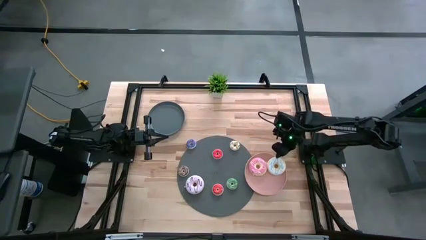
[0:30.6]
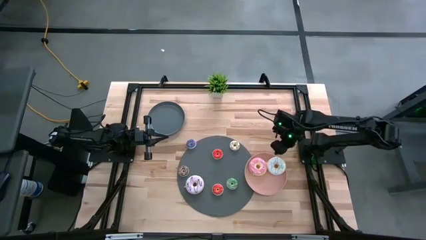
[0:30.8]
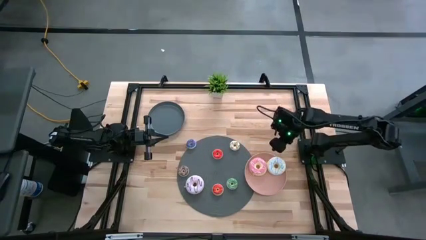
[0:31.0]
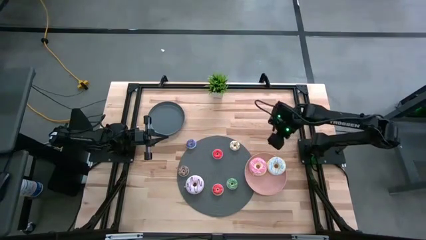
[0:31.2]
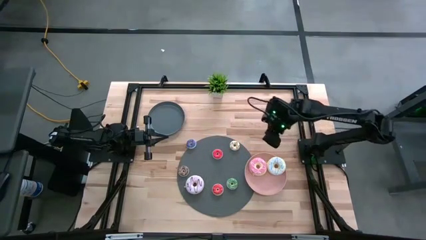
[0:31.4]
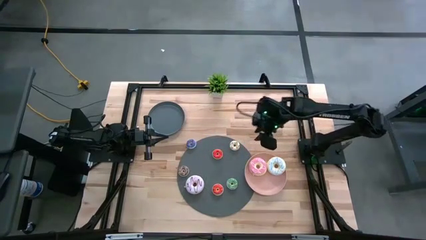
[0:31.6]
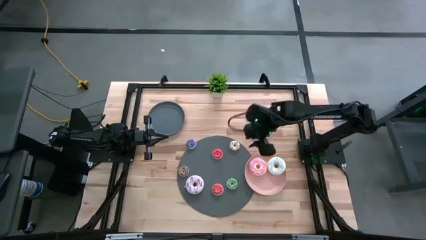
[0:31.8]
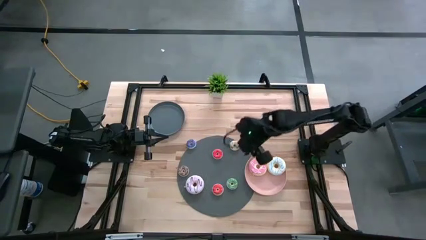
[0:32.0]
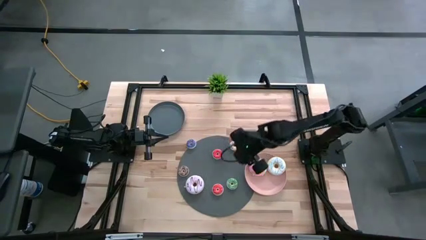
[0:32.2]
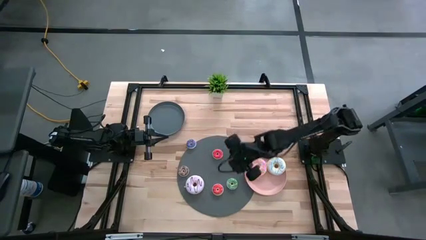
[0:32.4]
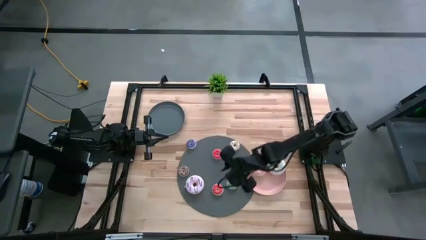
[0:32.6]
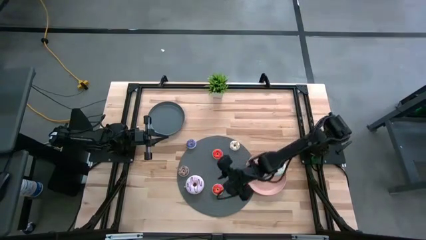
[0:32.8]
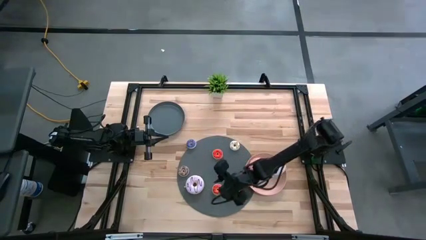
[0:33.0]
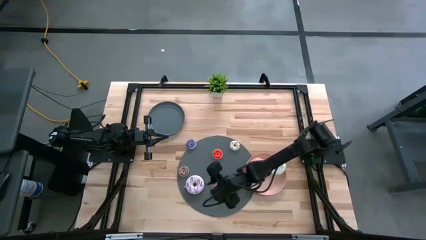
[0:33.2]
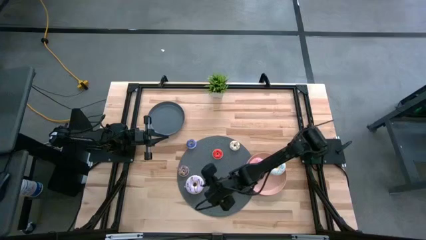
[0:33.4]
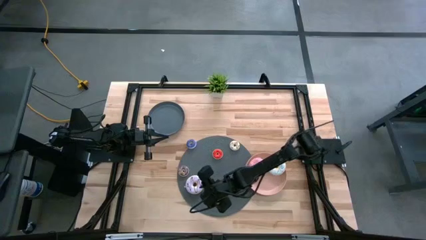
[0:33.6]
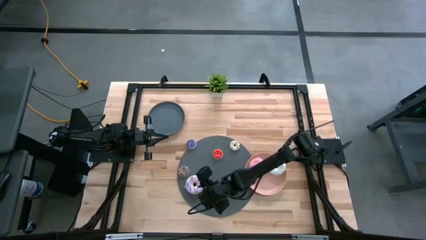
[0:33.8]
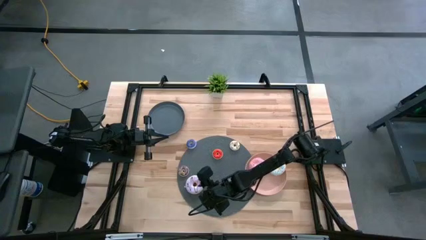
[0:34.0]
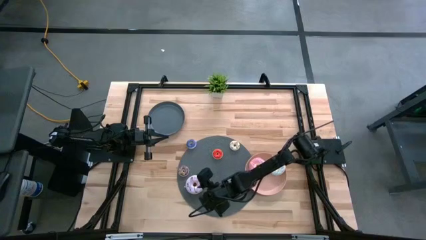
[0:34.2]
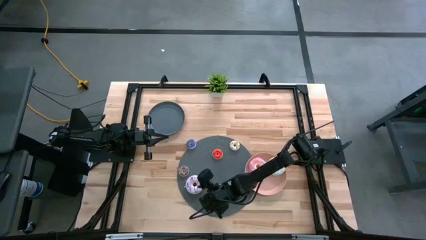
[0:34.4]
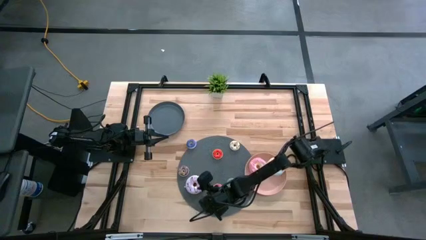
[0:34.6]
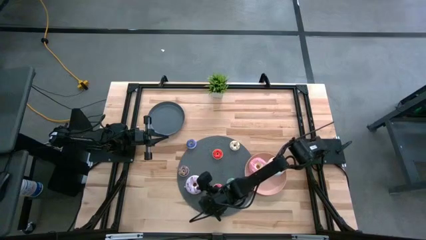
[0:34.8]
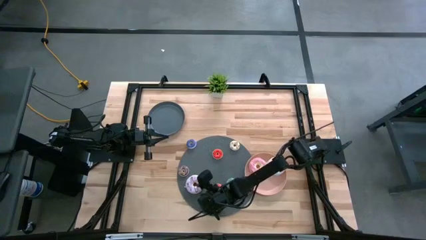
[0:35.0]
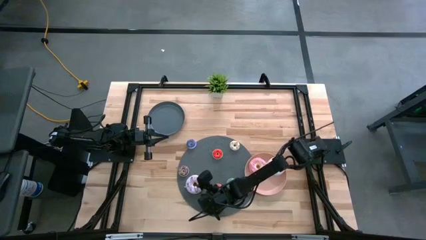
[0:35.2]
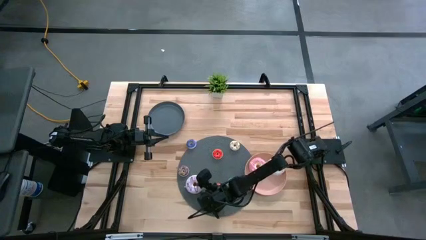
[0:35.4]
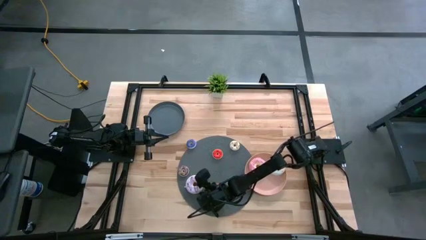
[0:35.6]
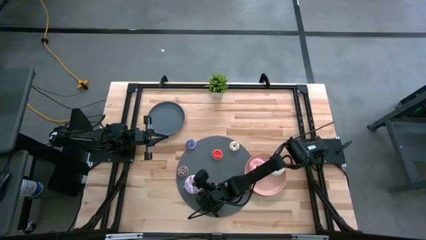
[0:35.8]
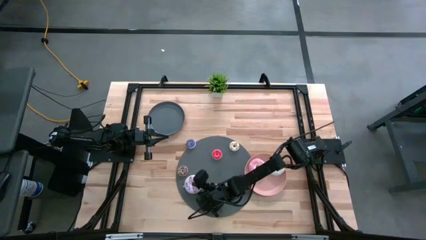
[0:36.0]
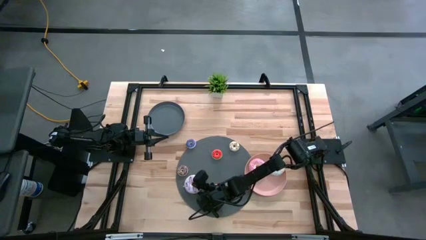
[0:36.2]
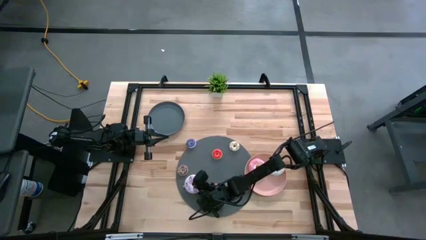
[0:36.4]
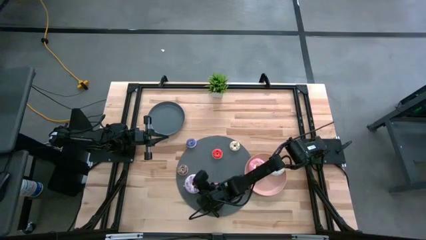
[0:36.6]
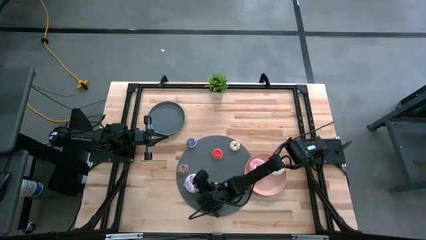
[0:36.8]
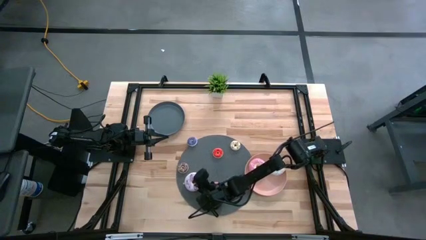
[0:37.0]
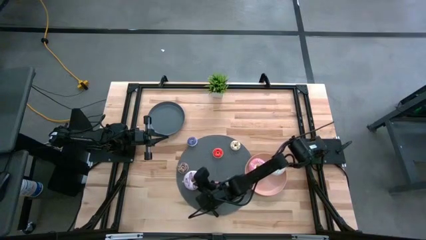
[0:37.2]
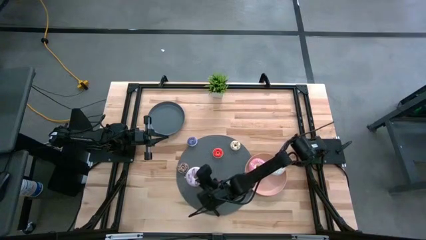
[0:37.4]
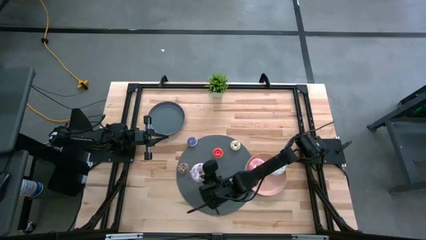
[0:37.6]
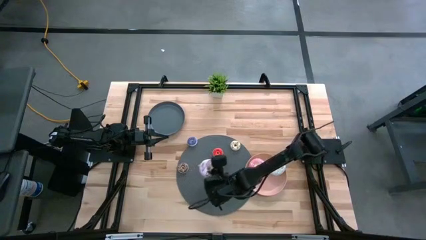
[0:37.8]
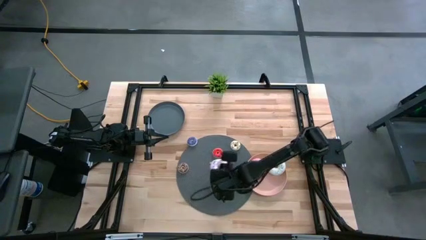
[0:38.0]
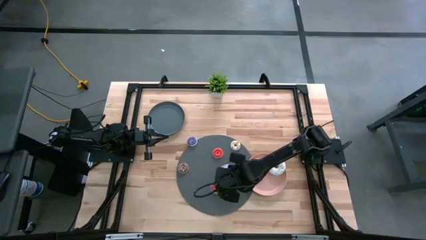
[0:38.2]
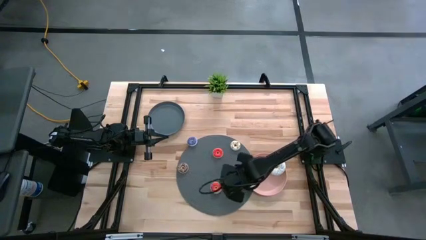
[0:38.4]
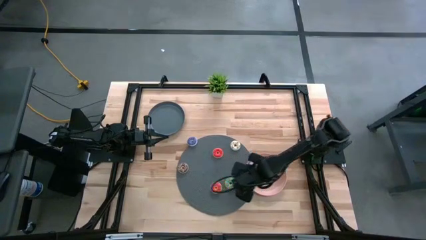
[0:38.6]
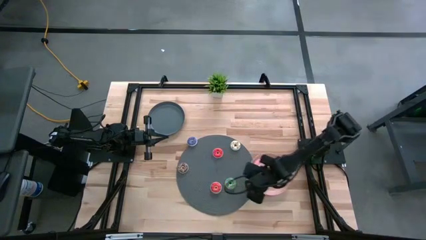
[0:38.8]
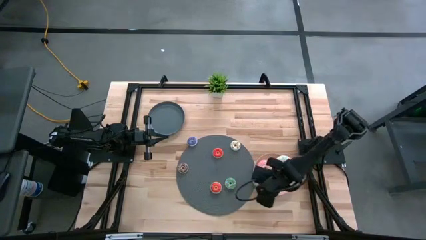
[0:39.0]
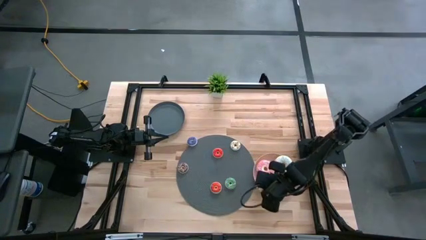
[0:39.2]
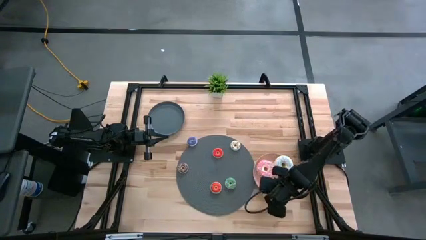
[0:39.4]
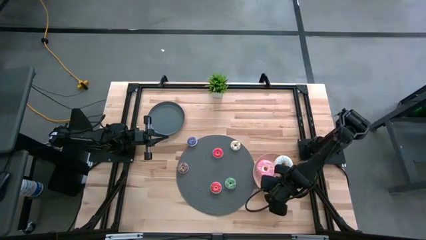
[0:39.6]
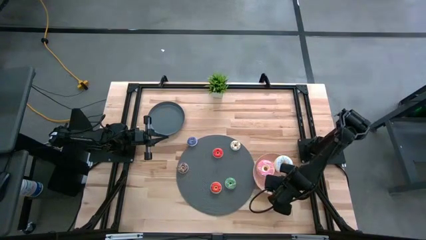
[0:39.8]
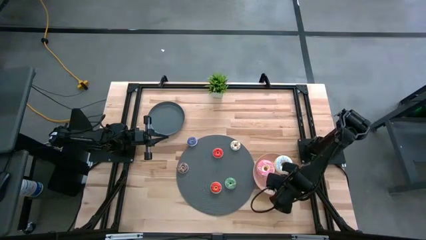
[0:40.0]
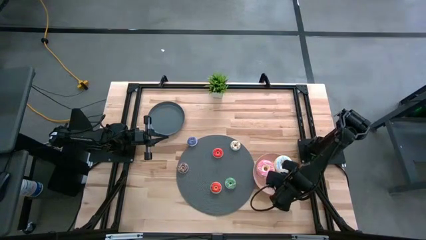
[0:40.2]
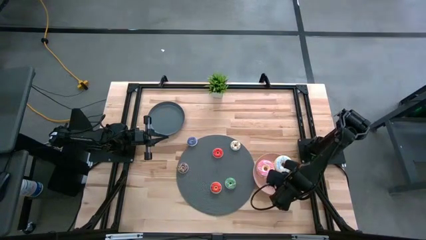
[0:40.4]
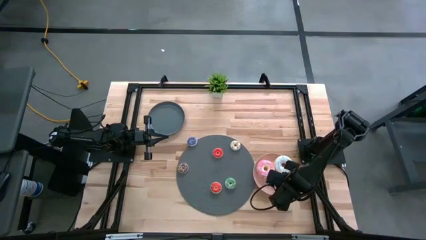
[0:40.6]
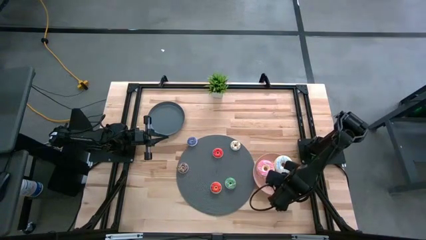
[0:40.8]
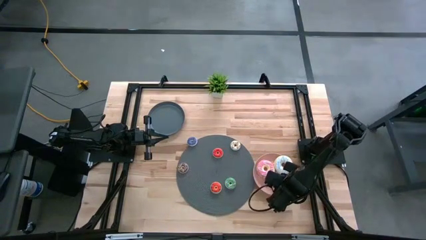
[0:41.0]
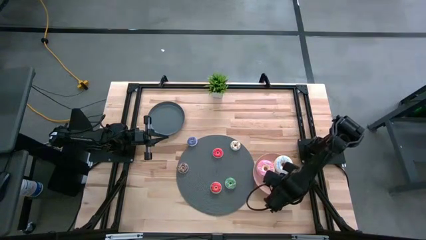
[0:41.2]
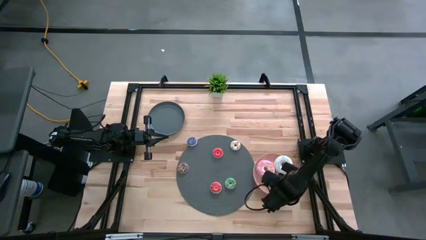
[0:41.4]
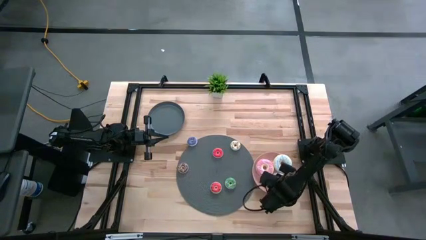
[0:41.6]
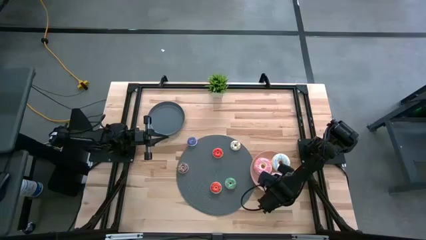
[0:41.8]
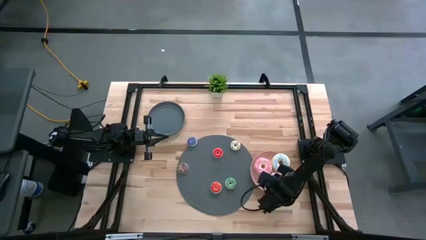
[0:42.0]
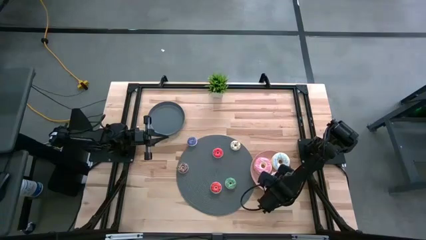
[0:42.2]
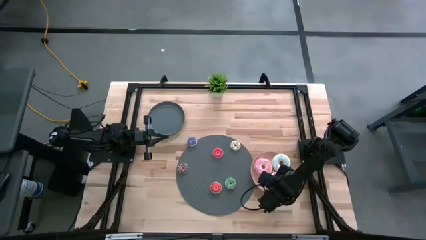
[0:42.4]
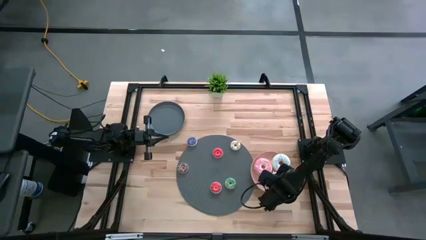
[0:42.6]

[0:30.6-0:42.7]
Task: Pick & Place donuts
Put the big purple donut on the pink plate

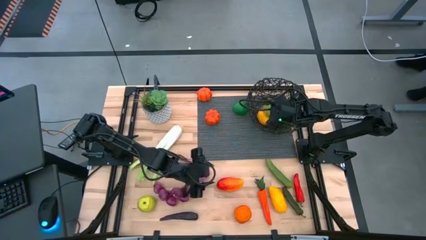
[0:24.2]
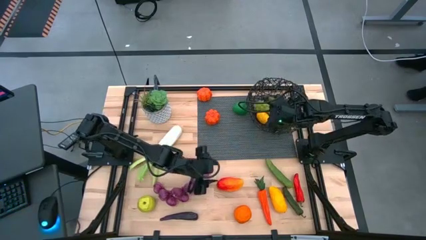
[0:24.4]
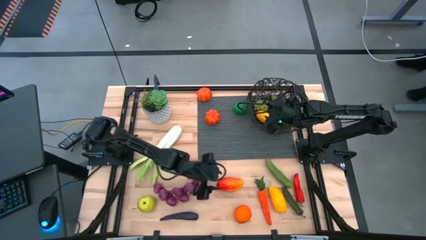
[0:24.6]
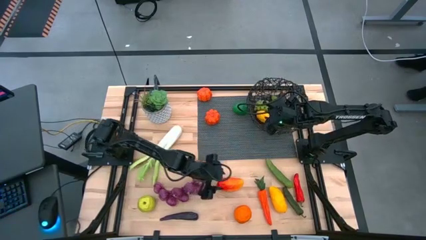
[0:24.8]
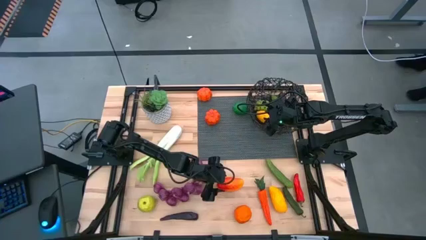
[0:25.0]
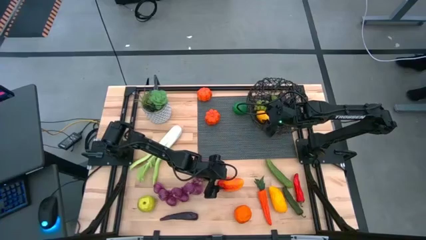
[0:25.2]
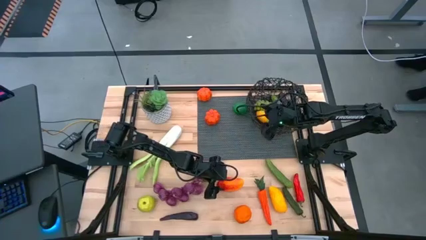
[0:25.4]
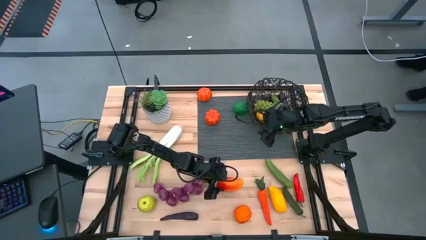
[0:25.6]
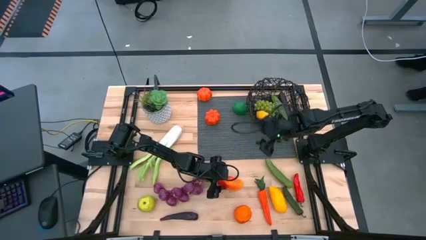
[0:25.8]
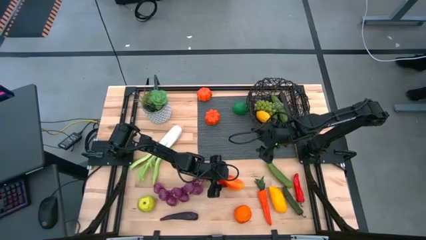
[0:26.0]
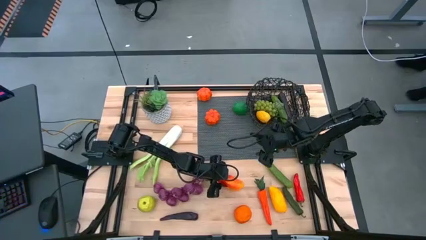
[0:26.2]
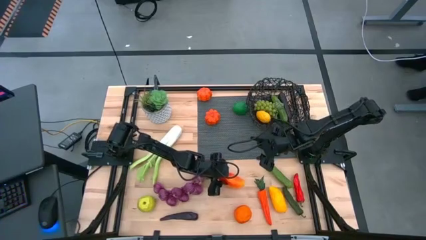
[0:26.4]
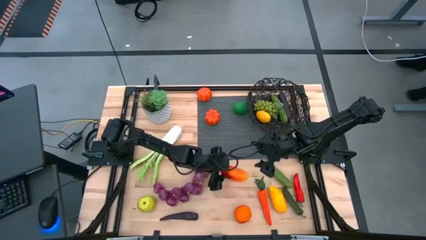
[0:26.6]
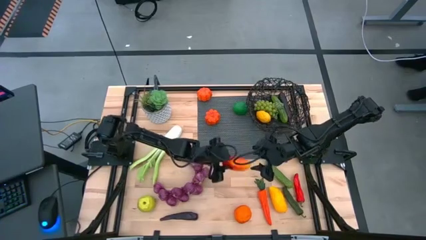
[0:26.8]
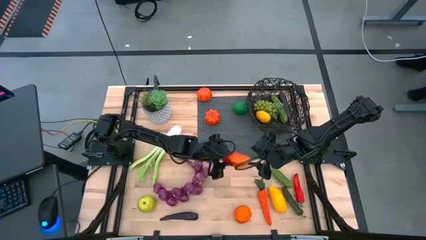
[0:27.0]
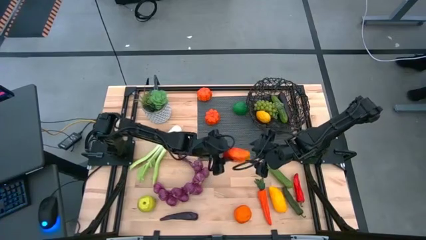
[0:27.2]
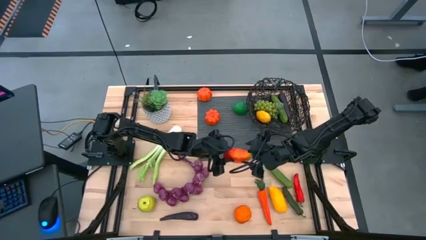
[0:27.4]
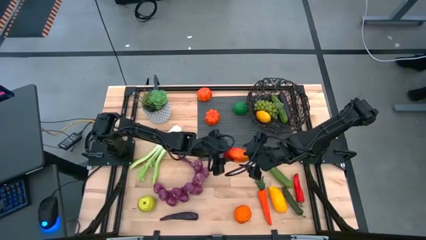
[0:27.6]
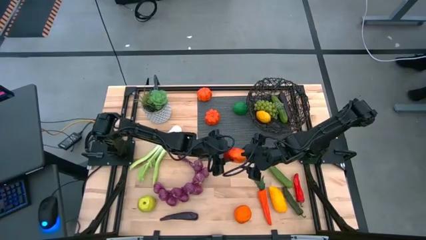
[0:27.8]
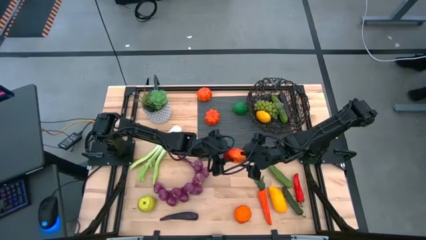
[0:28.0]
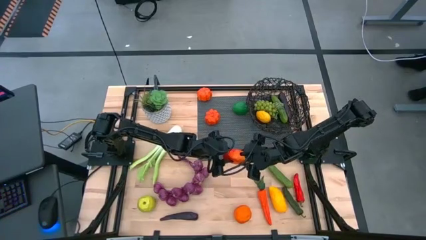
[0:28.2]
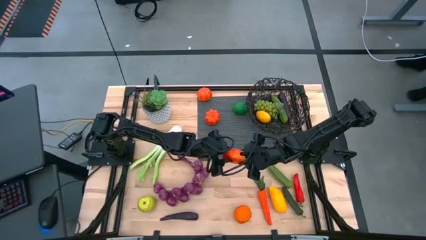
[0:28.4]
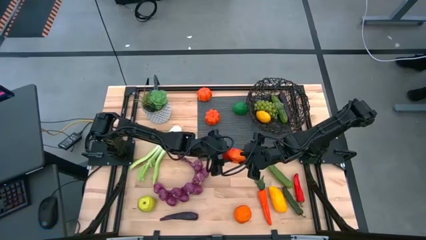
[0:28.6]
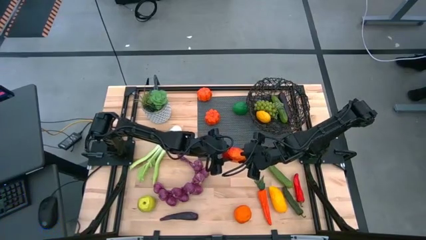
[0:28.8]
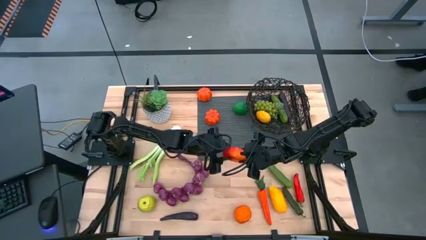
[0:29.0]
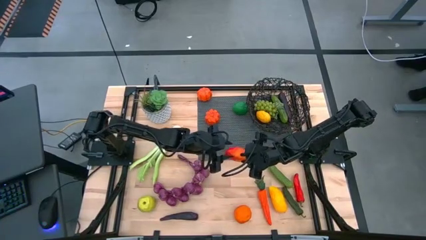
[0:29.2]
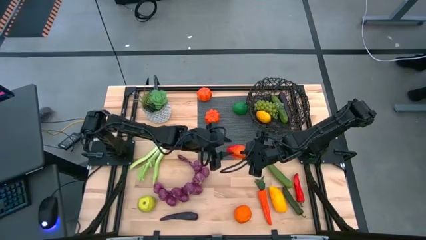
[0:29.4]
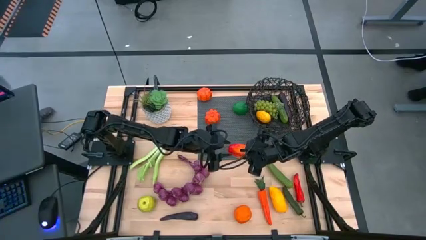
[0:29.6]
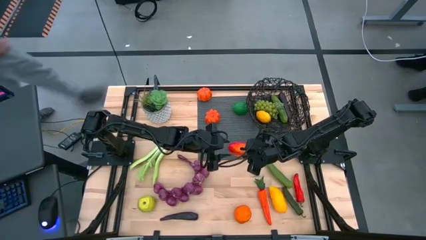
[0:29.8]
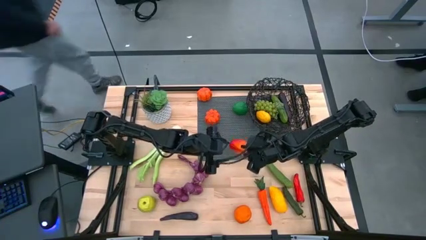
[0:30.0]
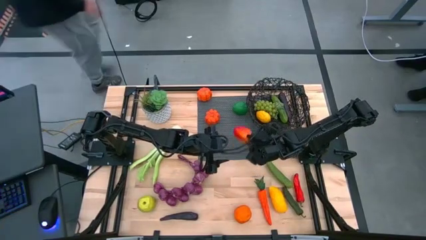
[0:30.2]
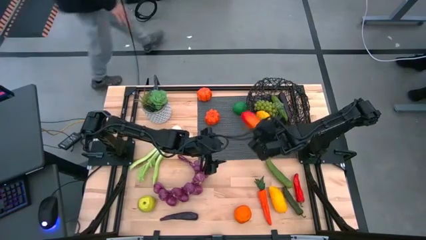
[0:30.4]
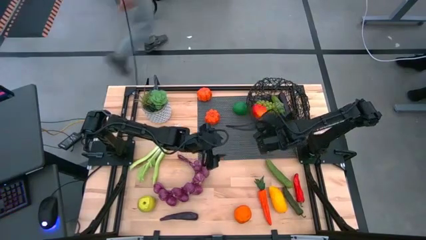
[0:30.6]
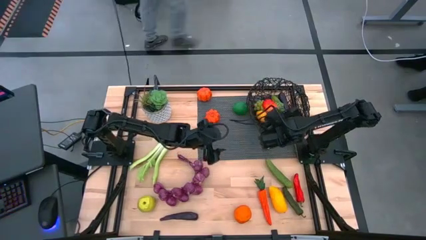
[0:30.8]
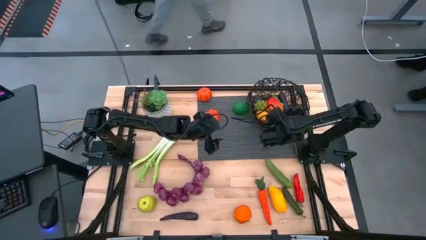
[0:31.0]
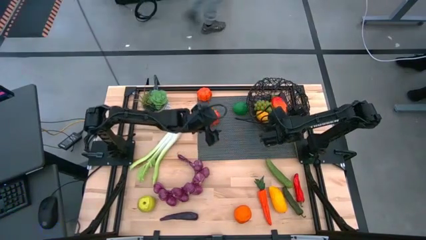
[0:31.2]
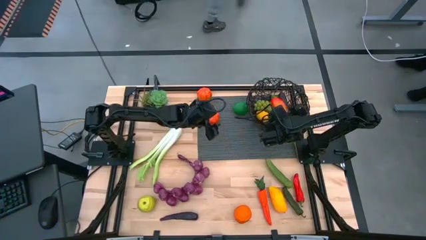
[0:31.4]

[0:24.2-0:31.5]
Task: Build produce basket
Put the orange mango into the black basket
